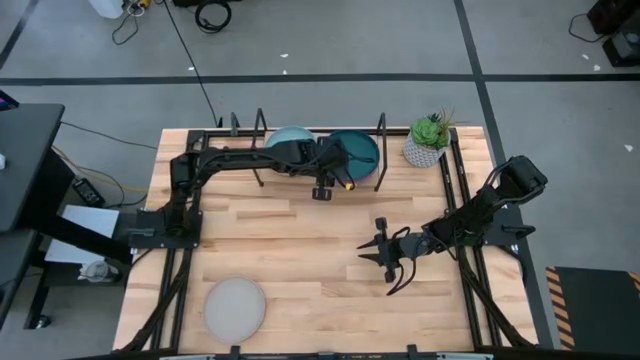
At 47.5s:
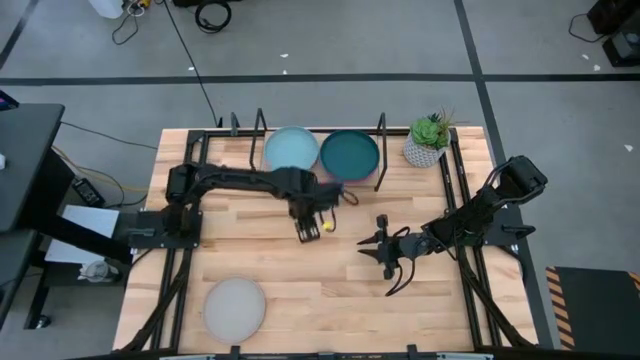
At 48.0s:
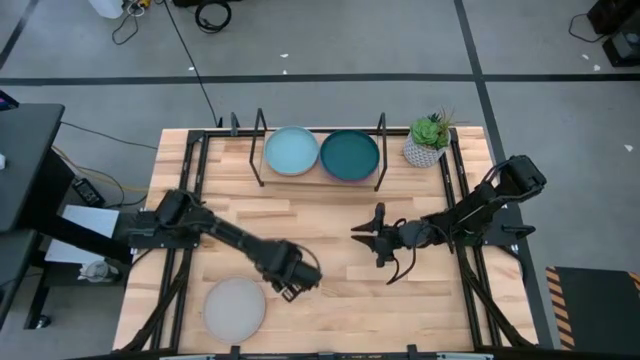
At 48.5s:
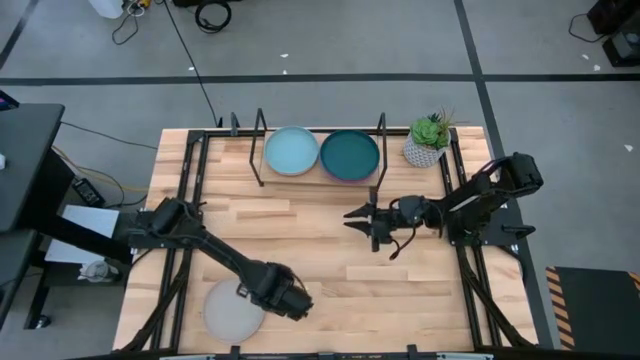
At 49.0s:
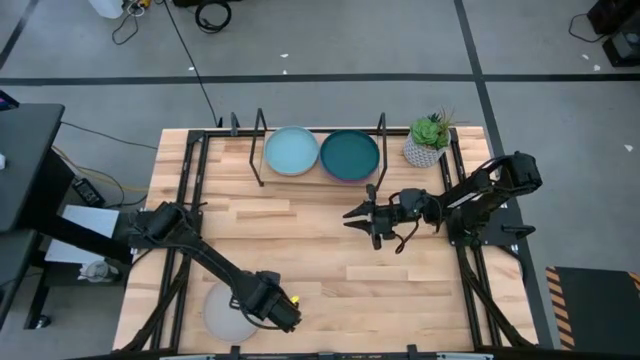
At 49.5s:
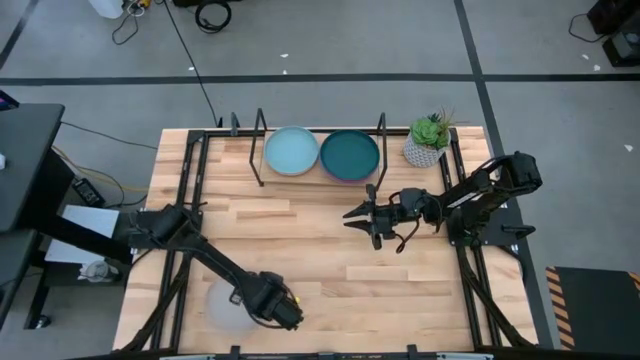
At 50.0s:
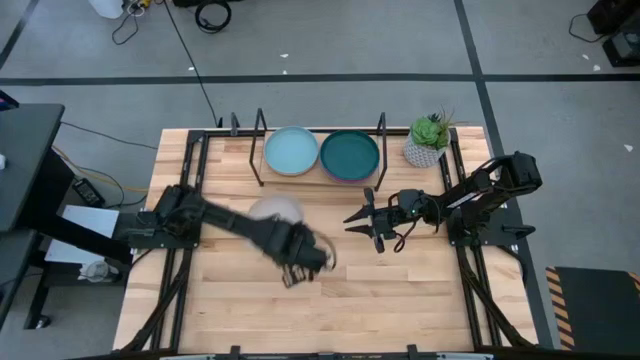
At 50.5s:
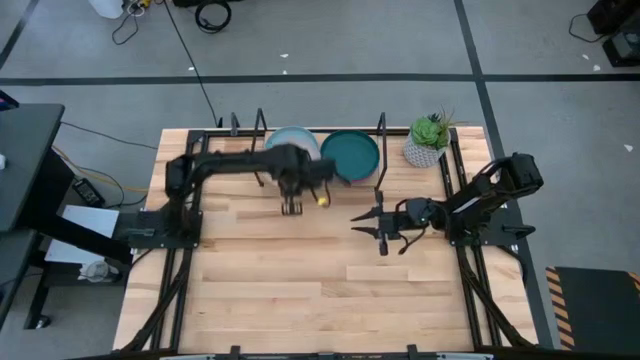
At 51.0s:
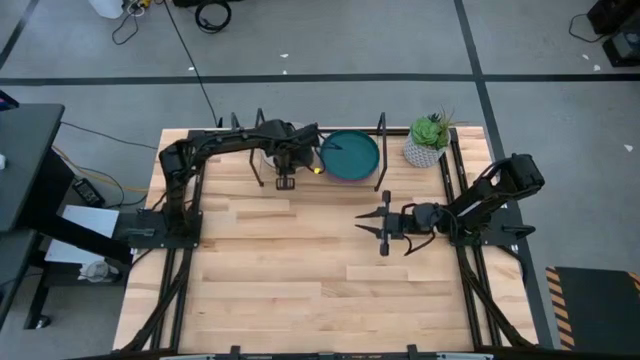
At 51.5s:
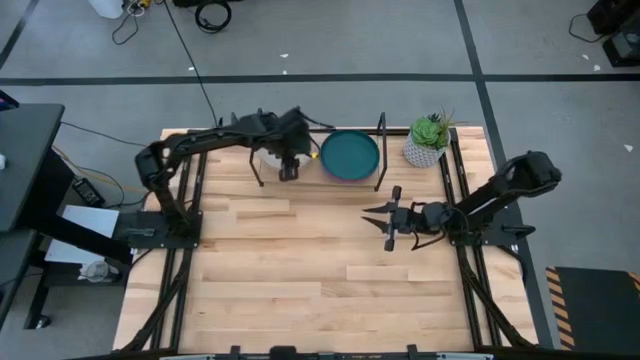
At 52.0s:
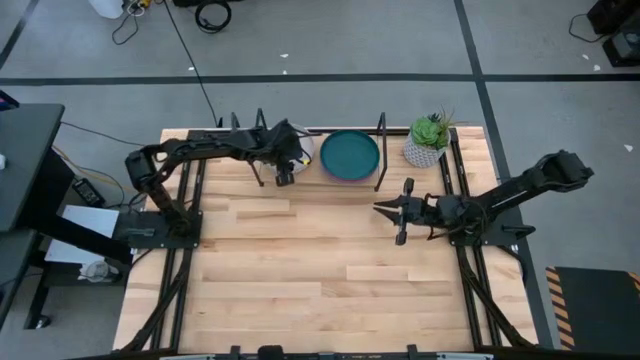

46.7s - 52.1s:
Task: Place and stack plates onto a shelf
Stack the gray plate on top of the light blue plate on the shelf

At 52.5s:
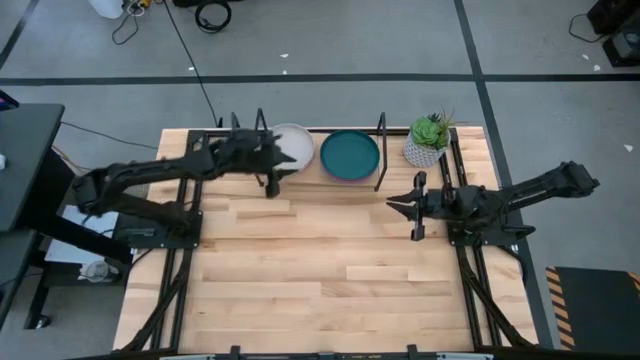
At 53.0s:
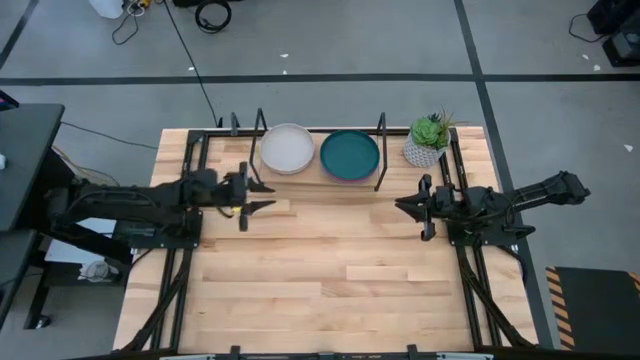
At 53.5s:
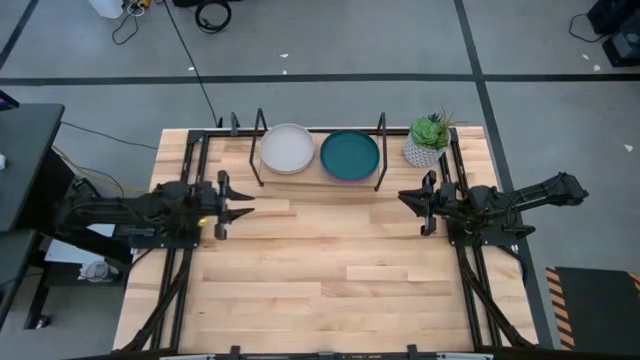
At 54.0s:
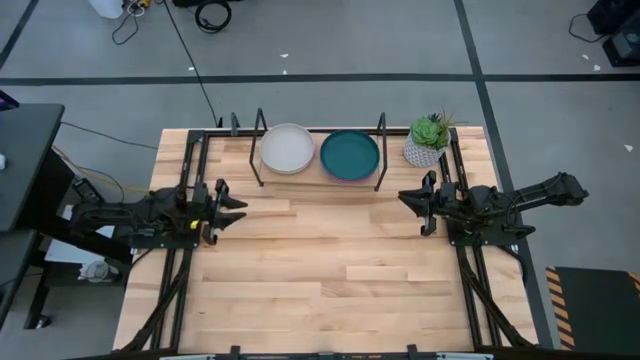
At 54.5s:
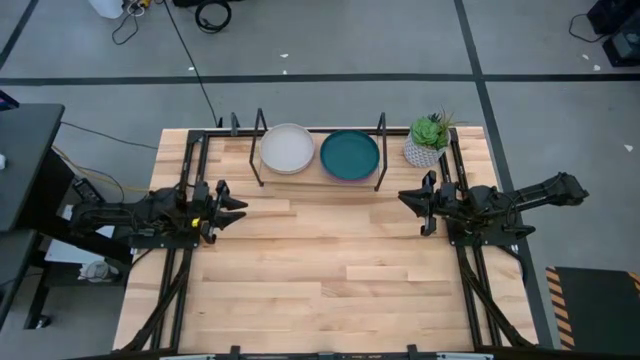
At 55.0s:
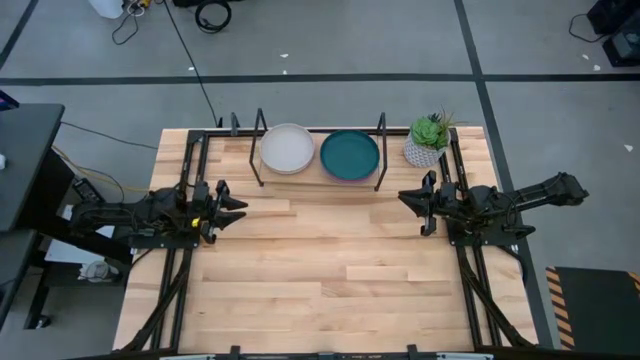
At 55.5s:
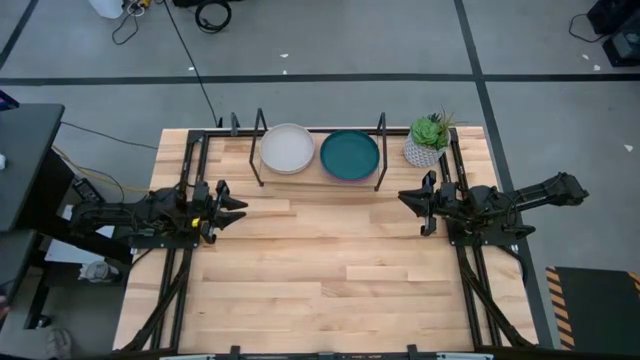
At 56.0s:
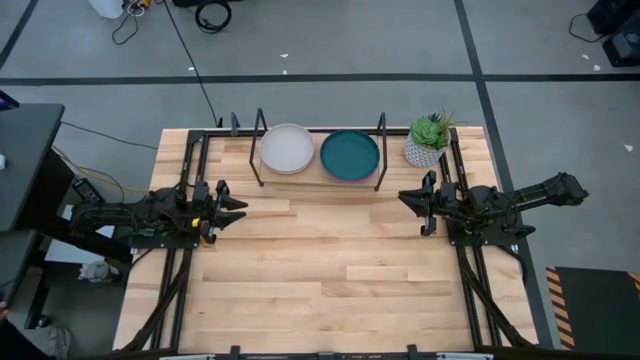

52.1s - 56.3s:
Return to Home Position

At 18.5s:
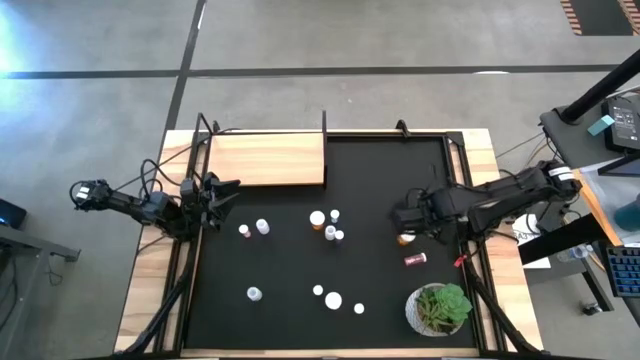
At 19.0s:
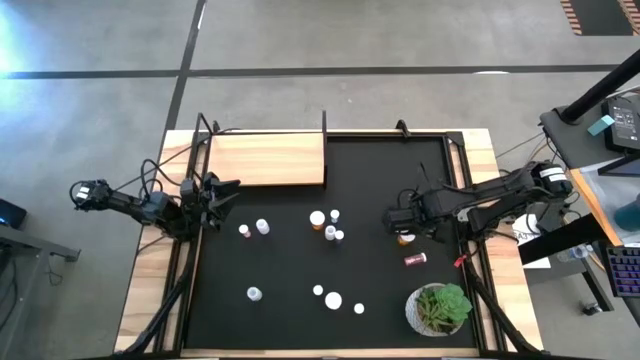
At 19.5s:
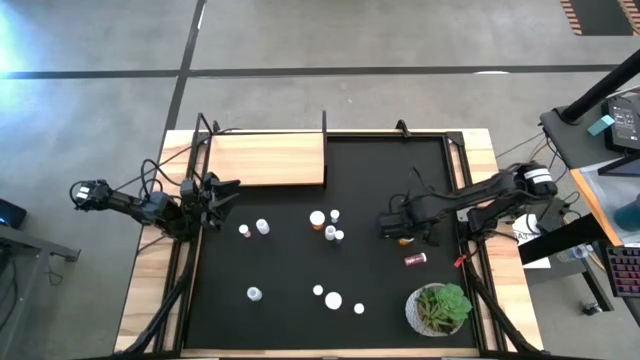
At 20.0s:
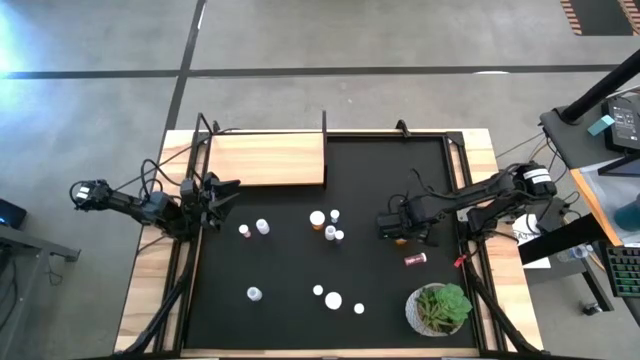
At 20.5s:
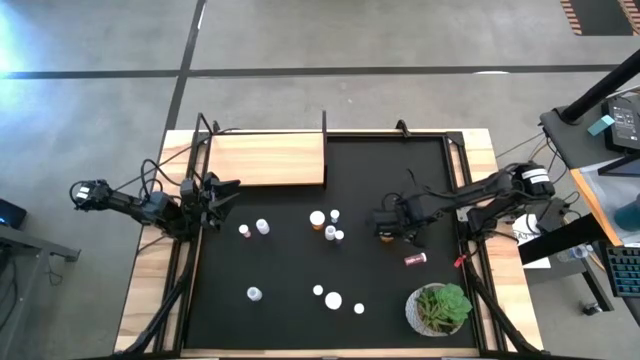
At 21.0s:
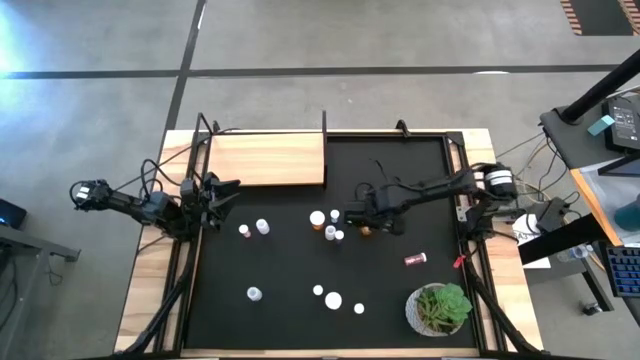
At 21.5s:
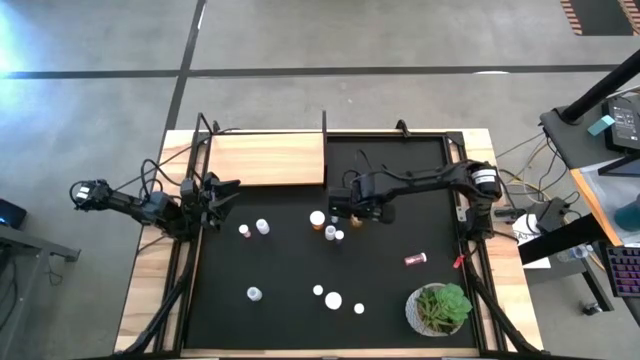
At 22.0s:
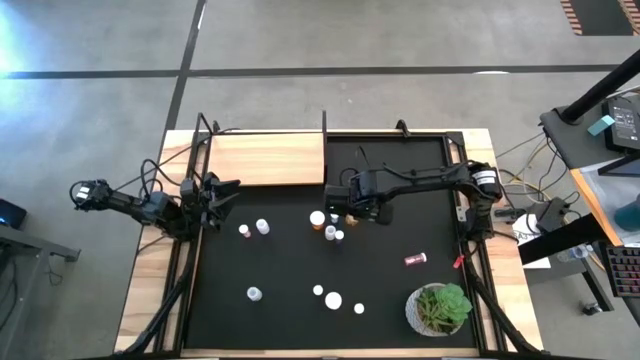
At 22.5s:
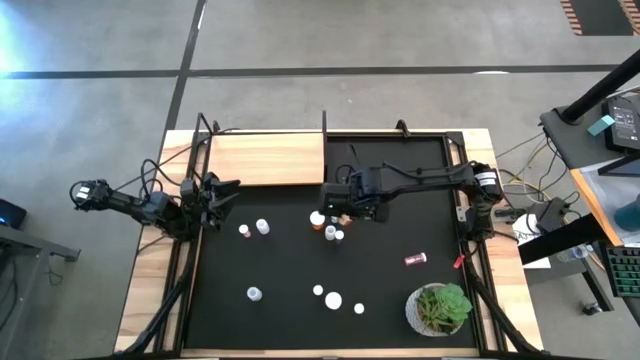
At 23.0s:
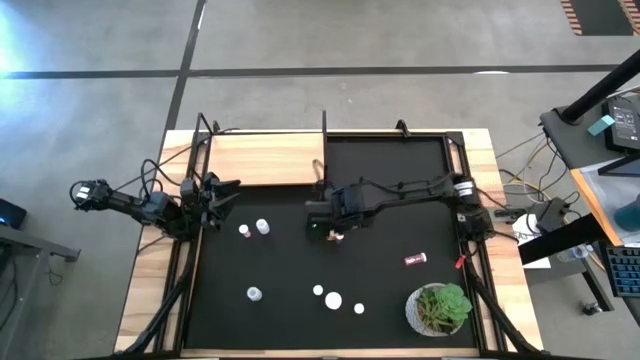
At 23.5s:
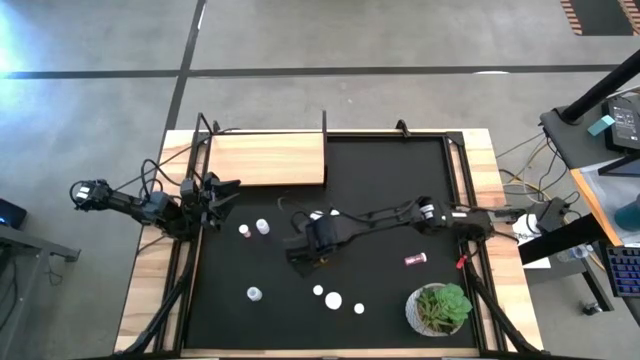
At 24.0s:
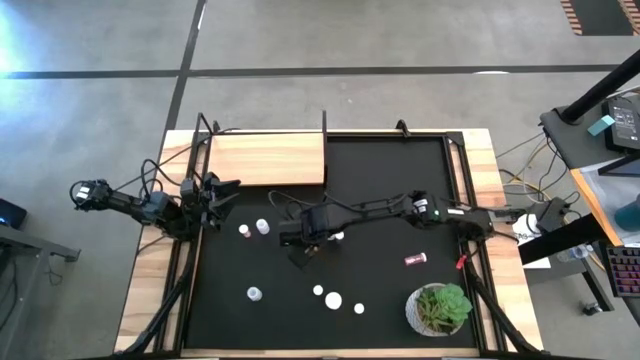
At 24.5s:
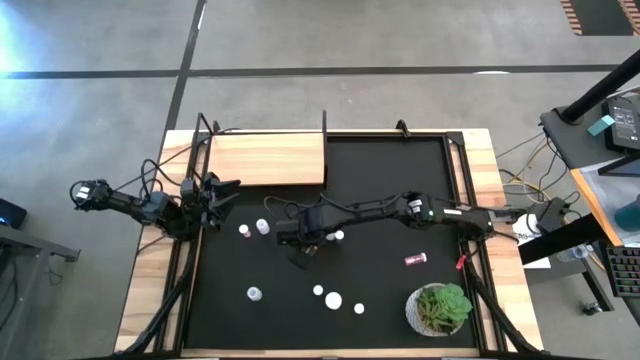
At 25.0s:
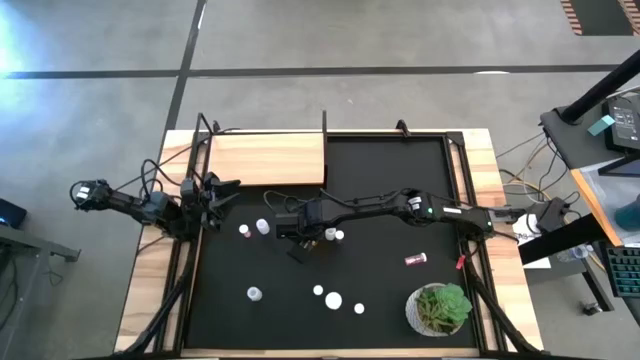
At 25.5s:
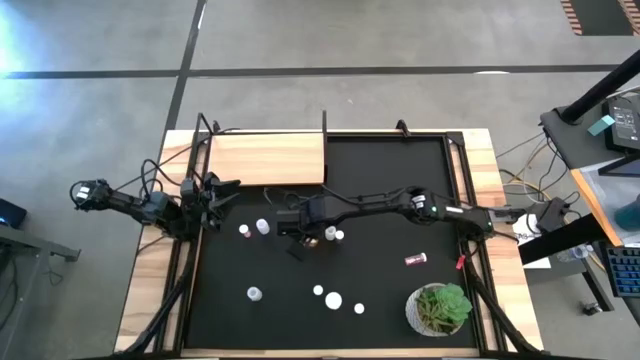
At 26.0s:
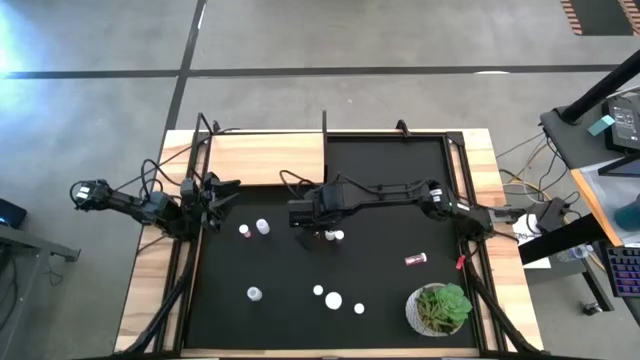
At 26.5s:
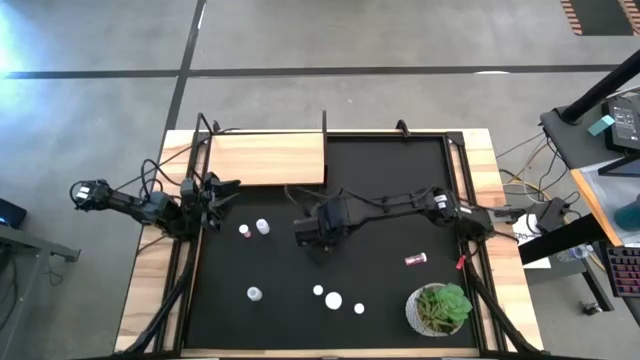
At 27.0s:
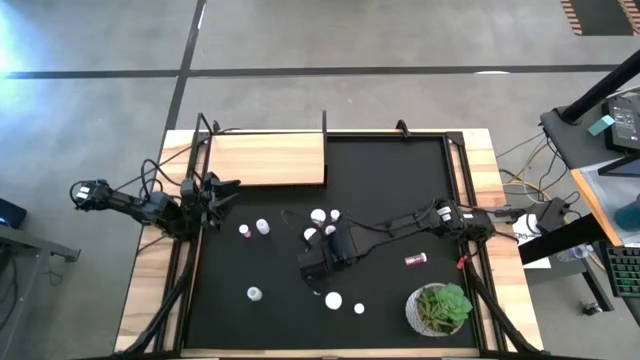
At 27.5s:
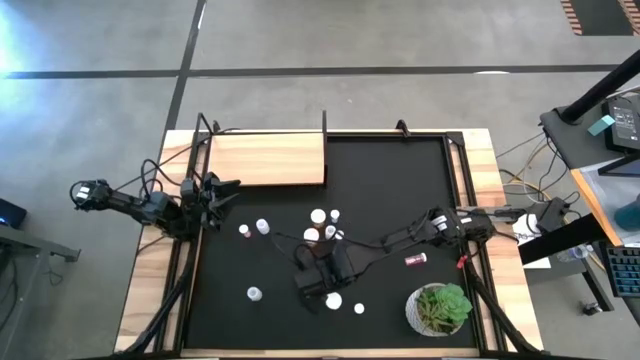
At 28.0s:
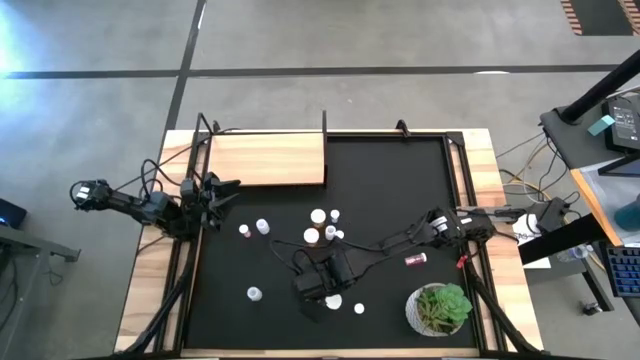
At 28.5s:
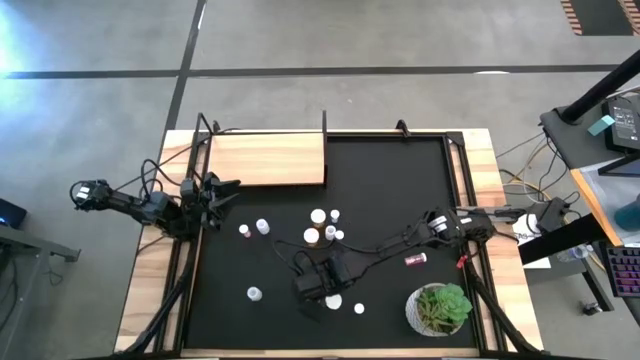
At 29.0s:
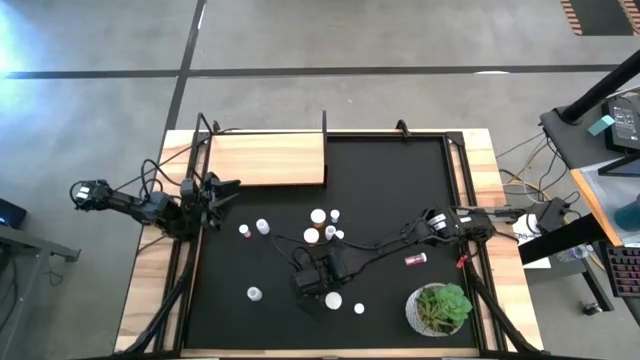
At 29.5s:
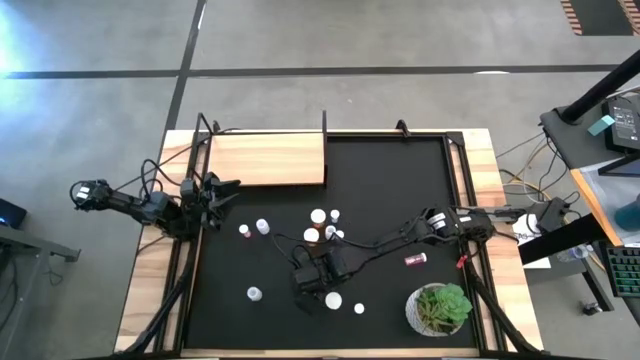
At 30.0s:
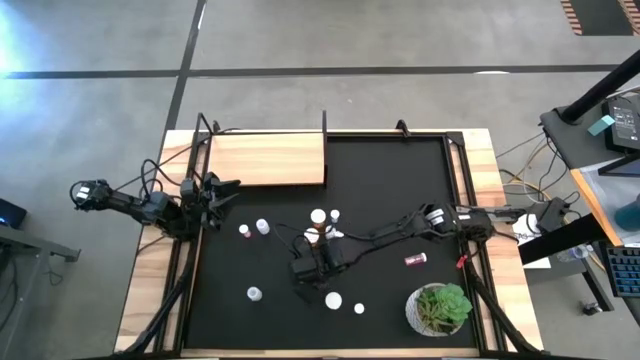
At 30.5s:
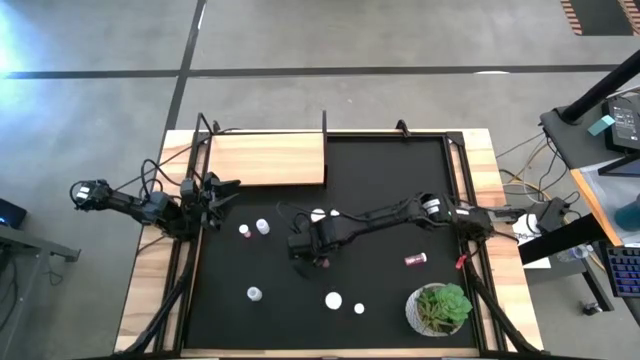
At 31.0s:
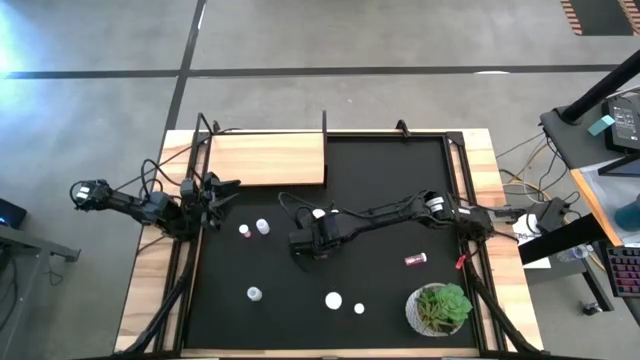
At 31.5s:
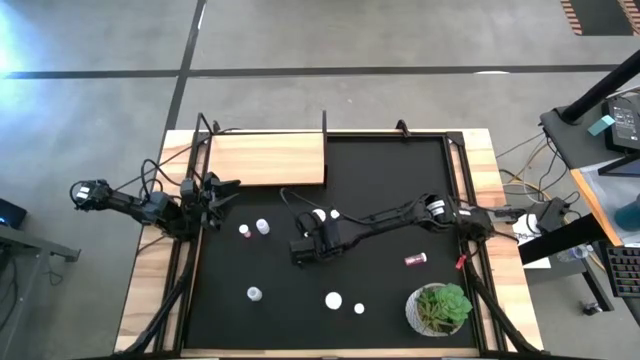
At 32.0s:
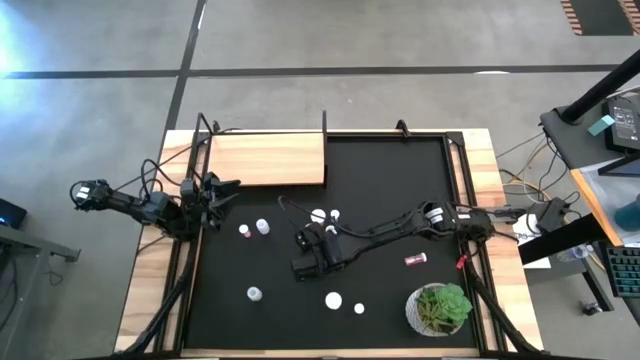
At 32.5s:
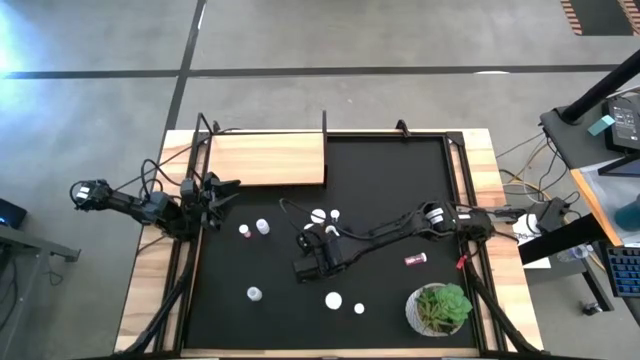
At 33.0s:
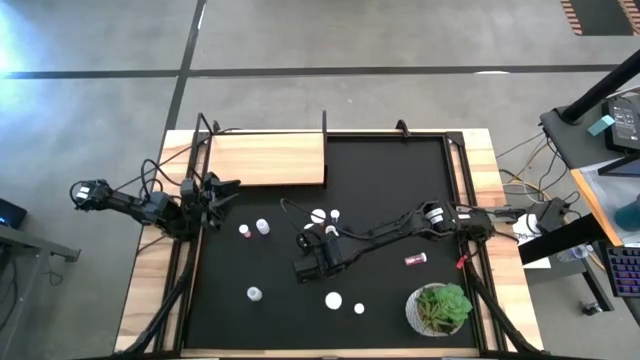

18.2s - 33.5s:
Task: Pick and place medicine bottles onto shelf by color
Prepare the pill bottles in the center of the table
